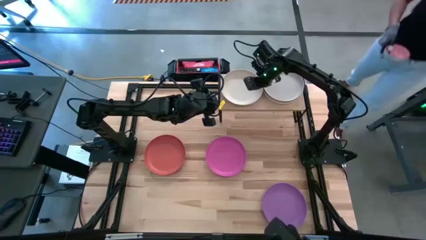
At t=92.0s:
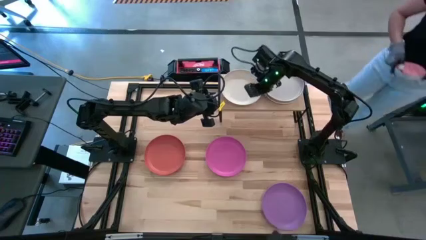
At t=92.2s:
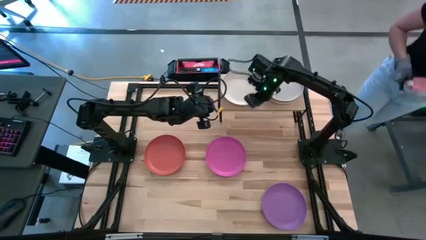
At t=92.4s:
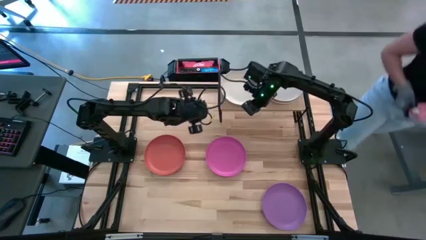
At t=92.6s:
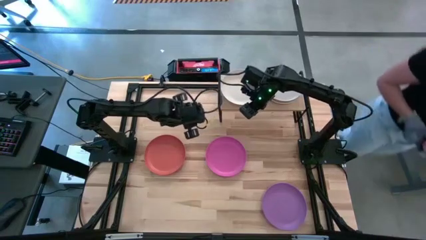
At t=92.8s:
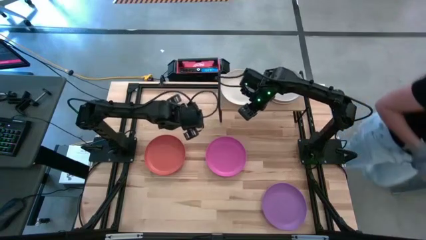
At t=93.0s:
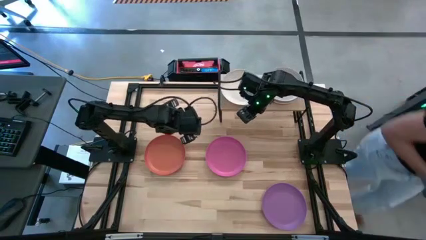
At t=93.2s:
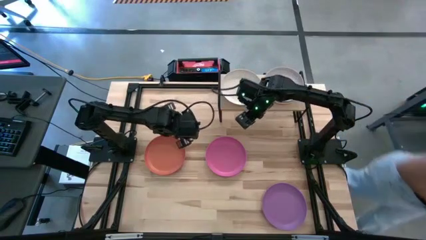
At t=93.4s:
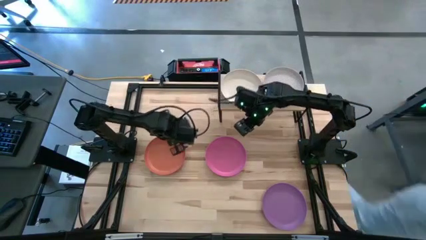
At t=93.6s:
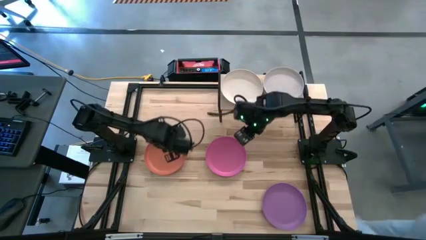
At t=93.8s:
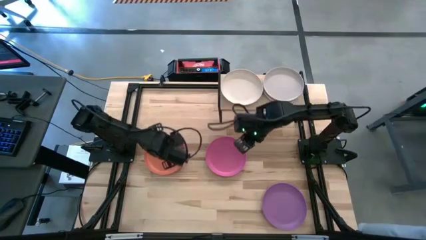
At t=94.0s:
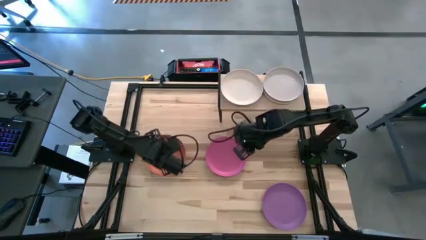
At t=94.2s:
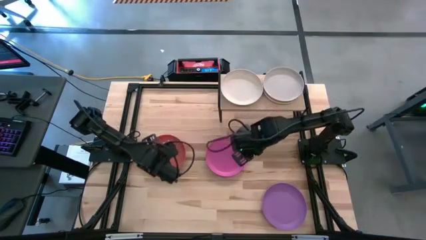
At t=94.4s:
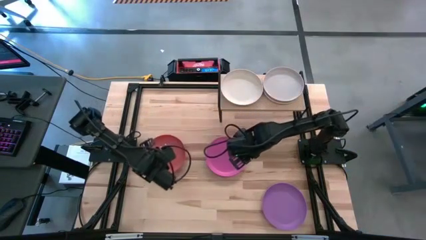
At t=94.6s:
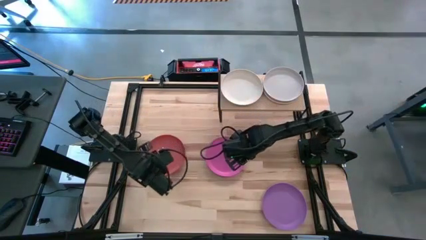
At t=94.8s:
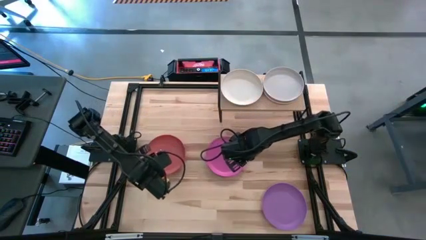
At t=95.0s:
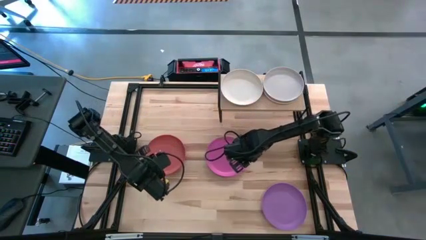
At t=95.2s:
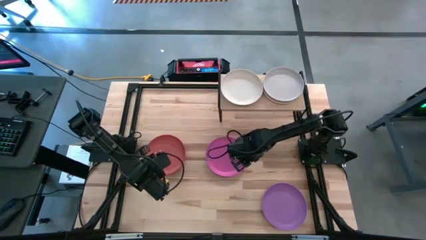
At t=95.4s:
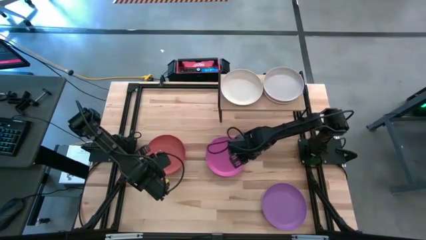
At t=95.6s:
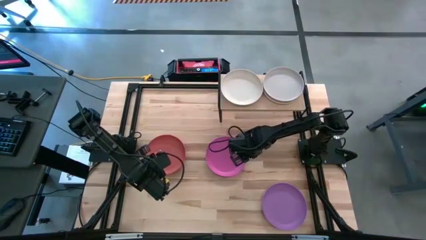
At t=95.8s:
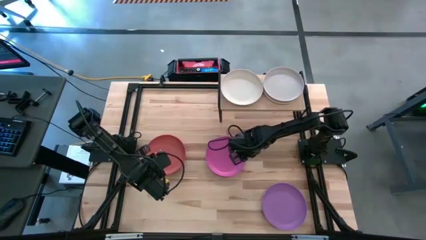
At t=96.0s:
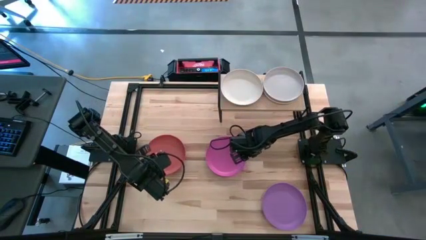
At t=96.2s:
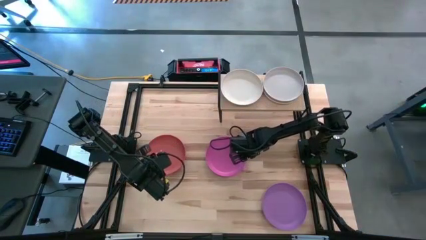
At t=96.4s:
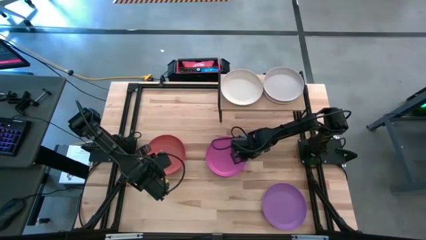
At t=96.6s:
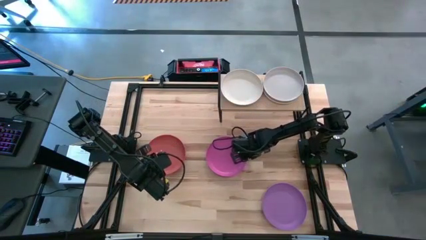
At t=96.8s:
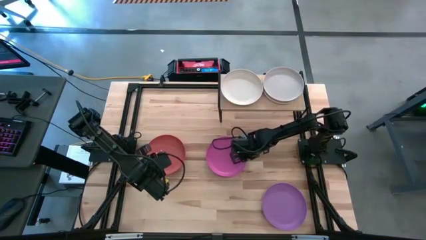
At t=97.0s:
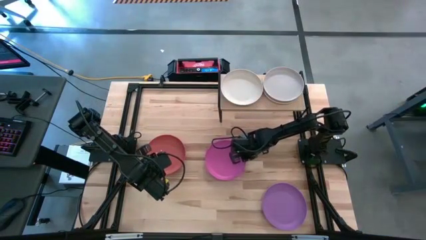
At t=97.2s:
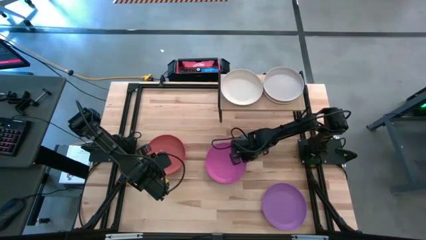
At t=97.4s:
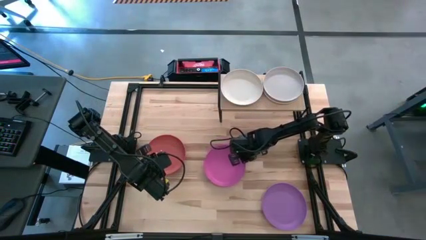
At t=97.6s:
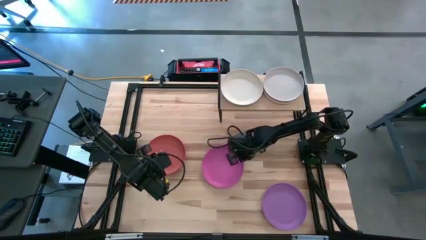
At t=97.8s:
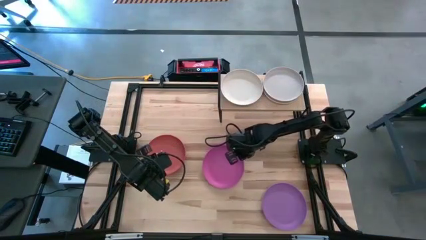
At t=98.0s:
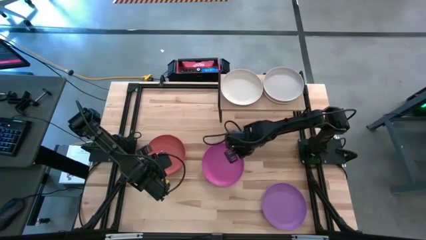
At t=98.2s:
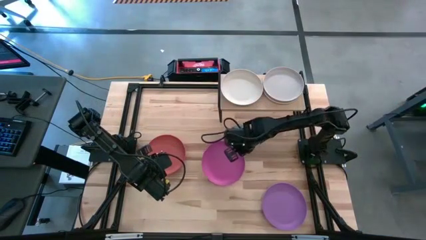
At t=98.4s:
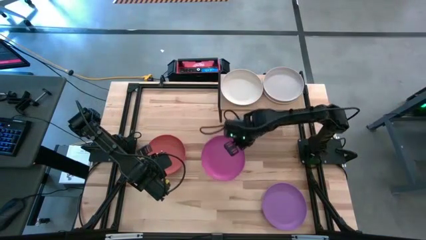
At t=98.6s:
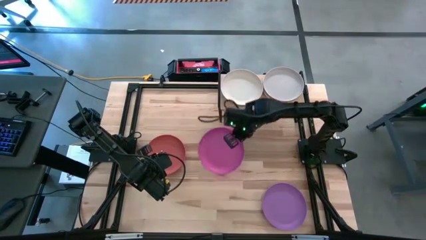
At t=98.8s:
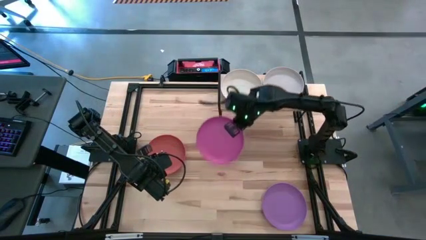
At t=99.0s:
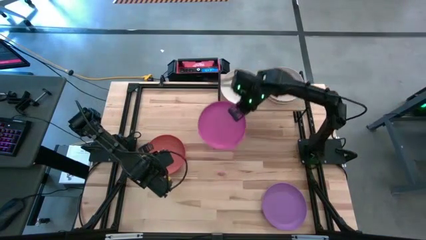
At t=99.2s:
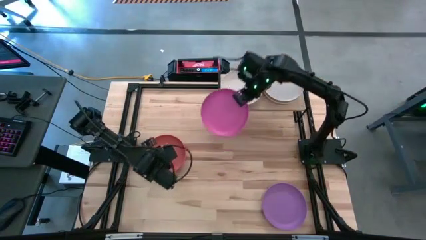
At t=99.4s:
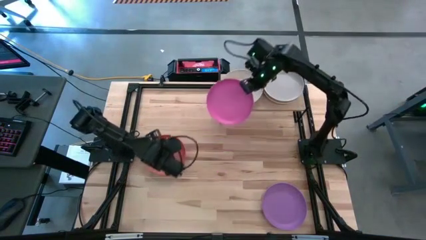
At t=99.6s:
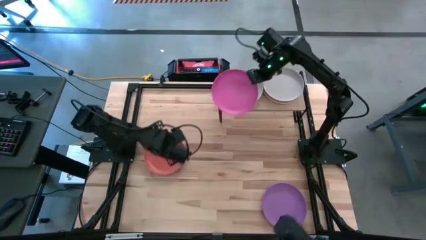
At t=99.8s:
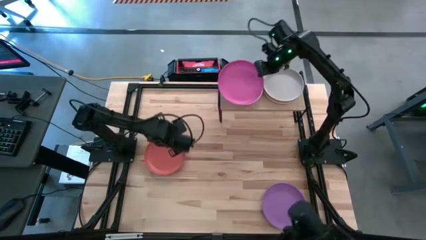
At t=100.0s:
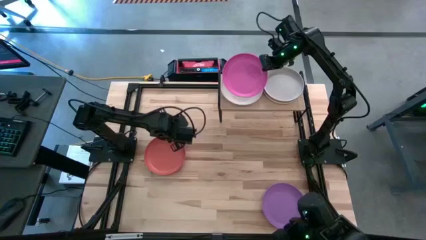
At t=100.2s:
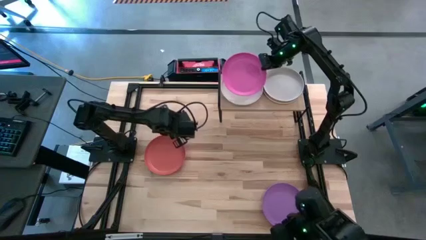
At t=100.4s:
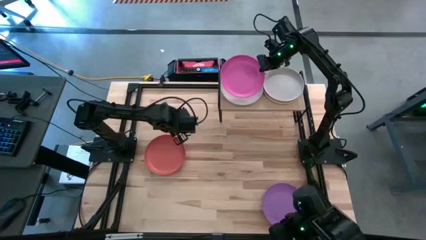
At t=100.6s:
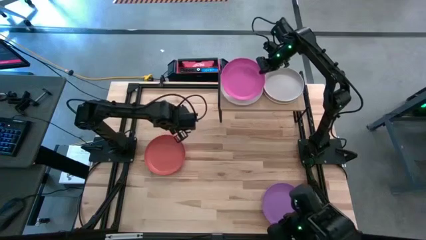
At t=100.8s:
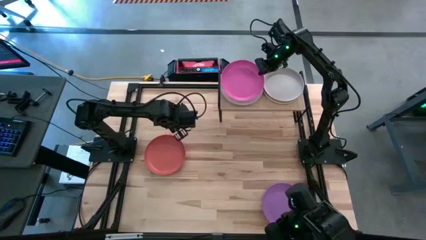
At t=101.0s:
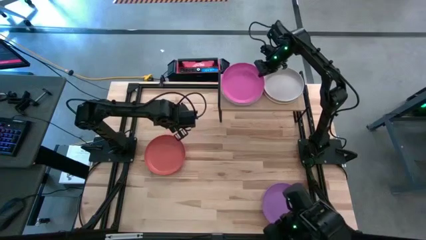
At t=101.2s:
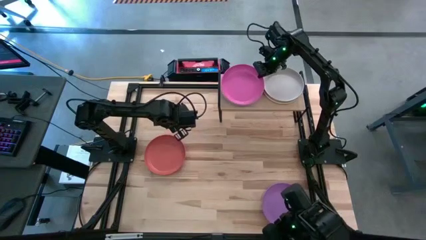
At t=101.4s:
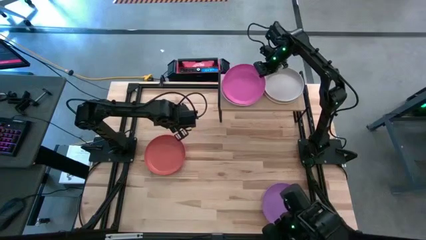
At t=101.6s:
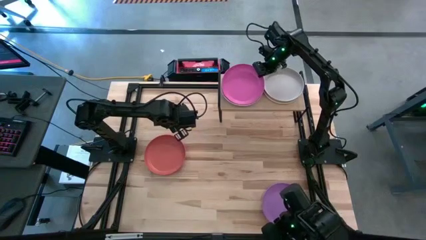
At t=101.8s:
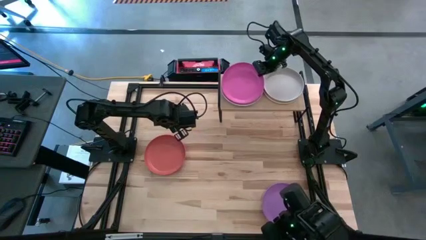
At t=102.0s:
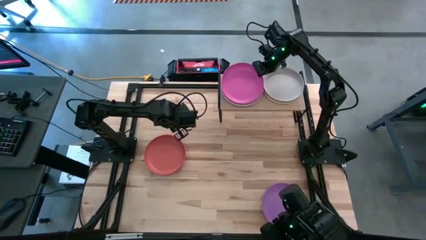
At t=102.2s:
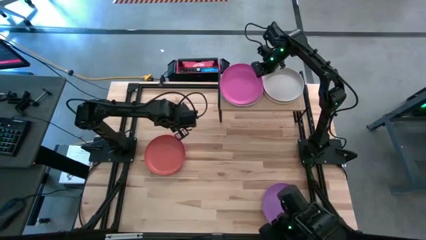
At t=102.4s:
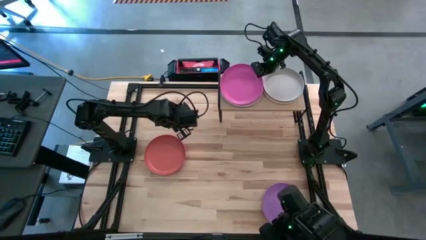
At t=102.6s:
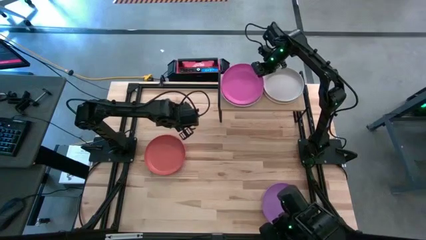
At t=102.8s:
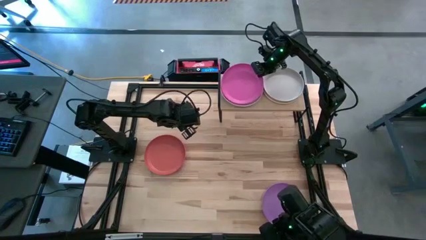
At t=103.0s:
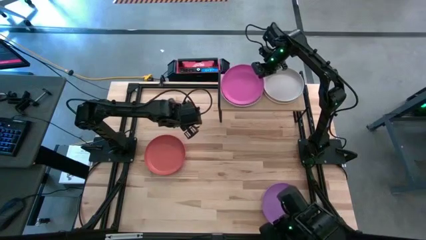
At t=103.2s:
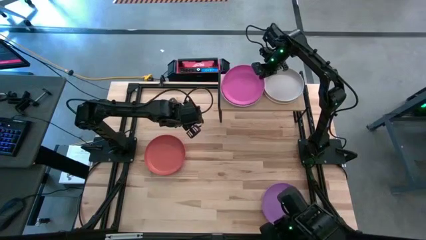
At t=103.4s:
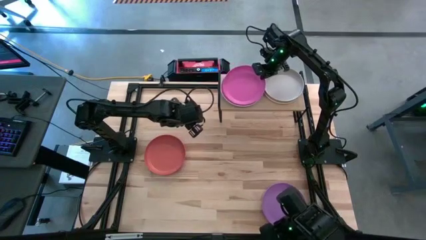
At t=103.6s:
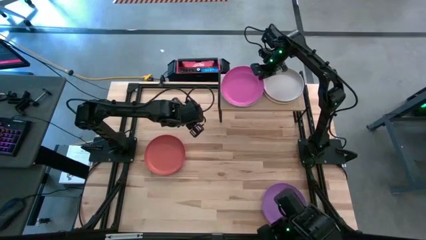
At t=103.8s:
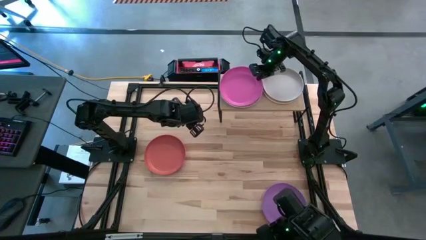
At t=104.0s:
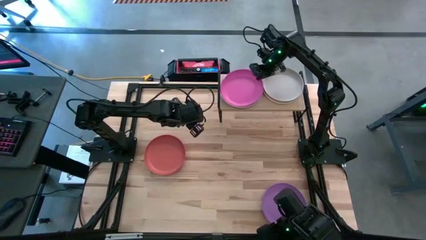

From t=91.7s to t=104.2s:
Task: Place and stack plates onto a shelf
Stack the pink plate on top of the cream plate on the shelf

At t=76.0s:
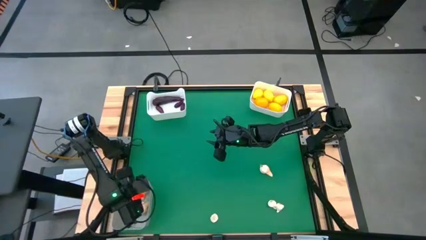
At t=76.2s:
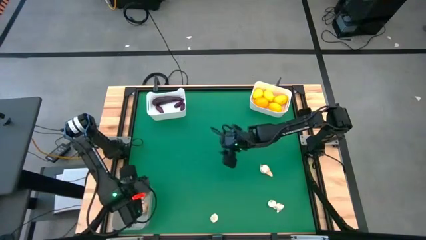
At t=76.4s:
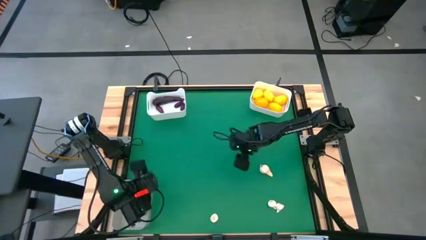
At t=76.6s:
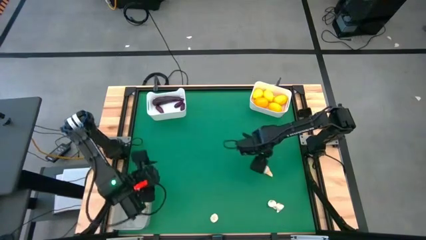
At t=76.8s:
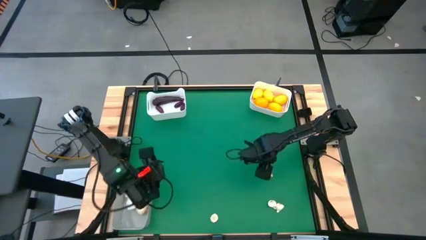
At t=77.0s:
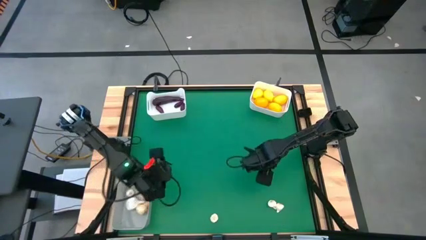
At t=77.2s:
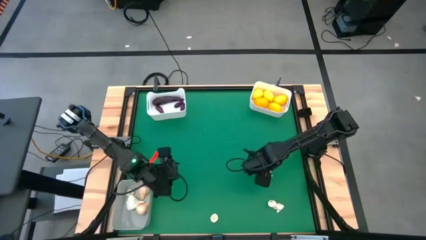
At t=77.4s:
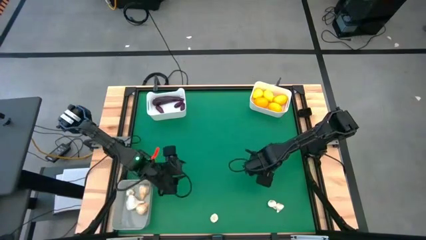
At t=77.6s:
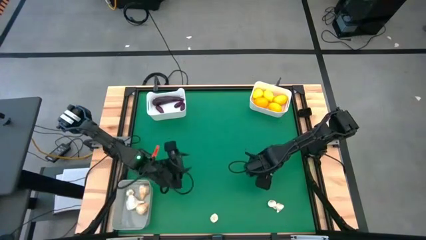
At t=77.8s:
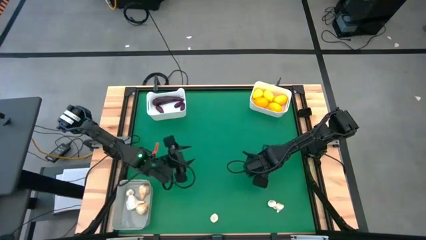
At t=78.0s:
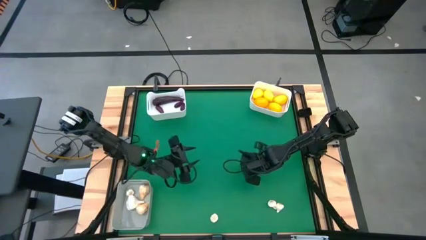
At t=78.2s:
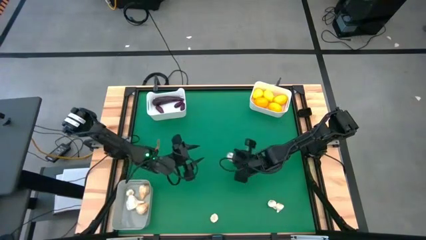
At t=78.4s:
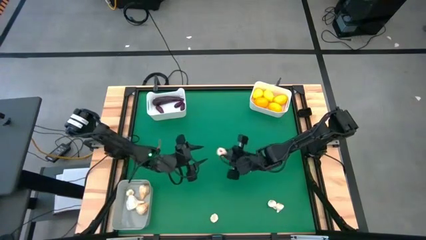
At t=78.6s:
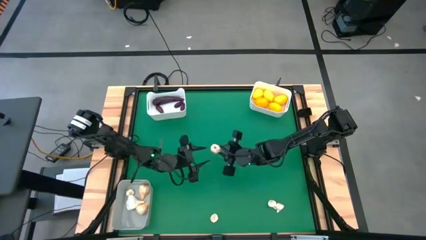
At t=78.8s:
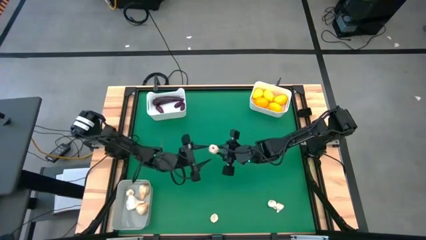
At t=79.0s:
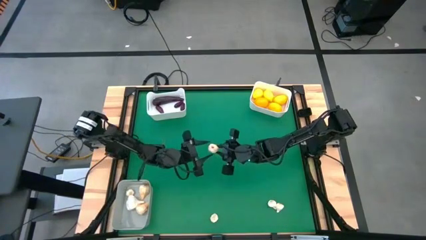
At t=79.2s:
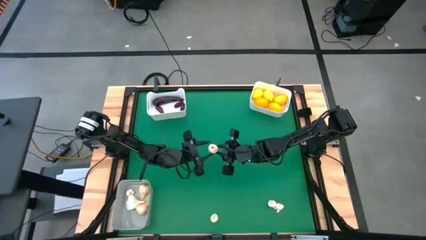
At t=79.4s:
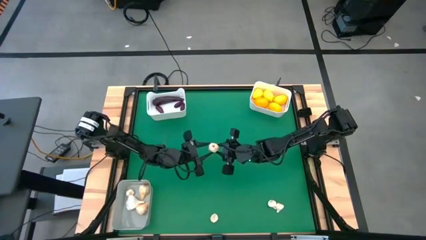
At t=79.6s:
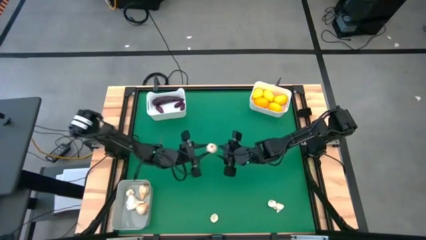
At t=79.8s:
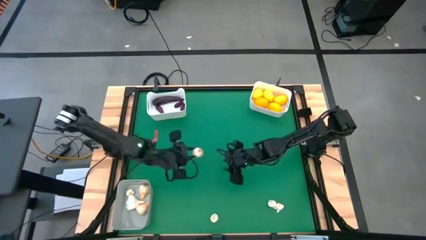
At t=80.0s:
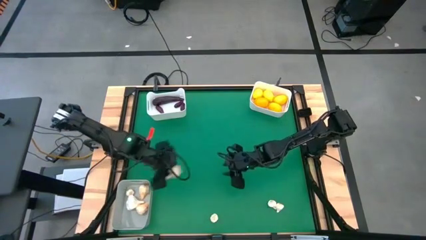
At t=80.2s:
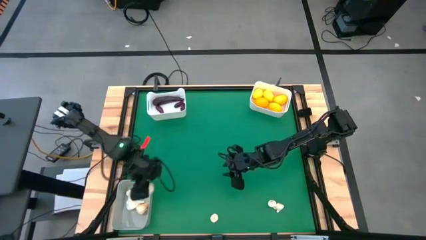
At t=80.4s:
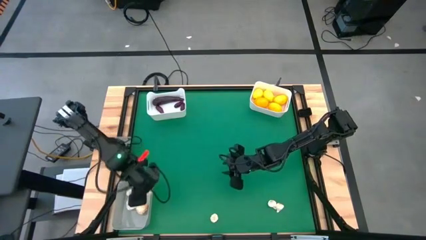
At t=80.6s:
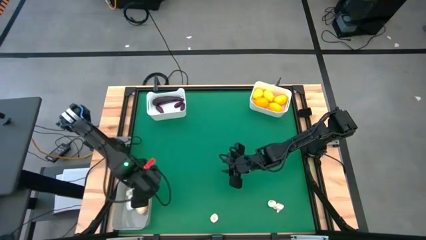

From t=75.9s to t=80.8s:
Task: Sort produce into baskets
Put the top right white garlic into the gray bin
